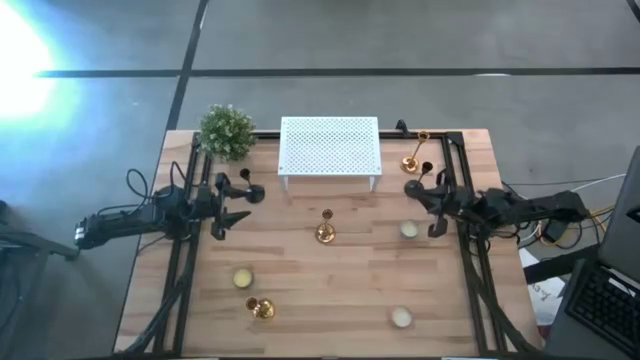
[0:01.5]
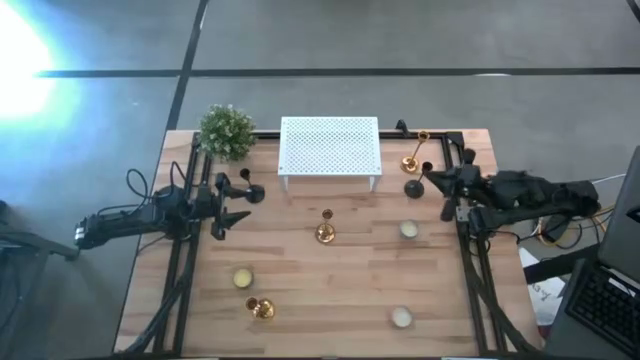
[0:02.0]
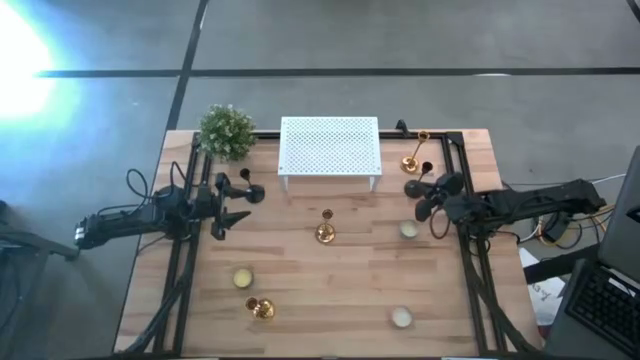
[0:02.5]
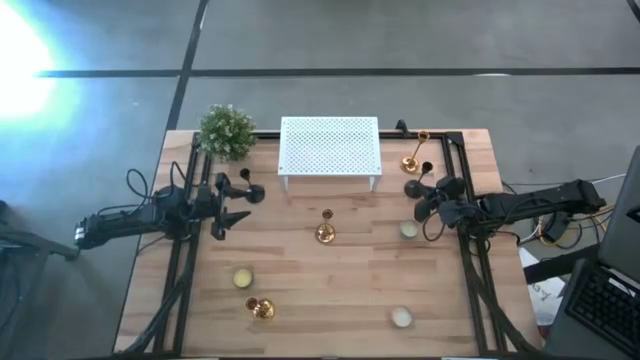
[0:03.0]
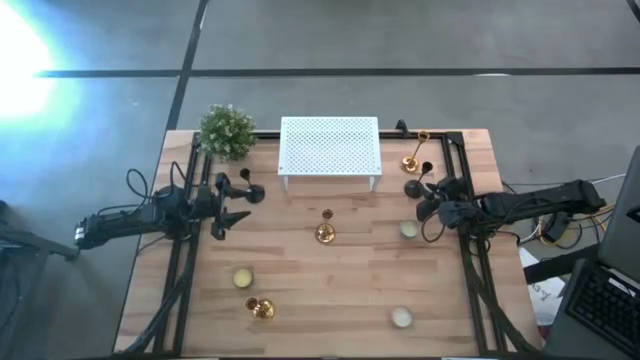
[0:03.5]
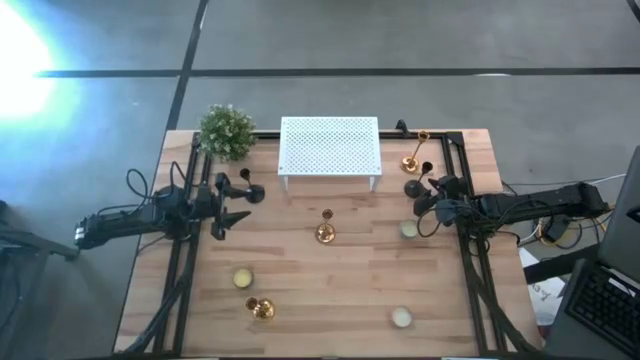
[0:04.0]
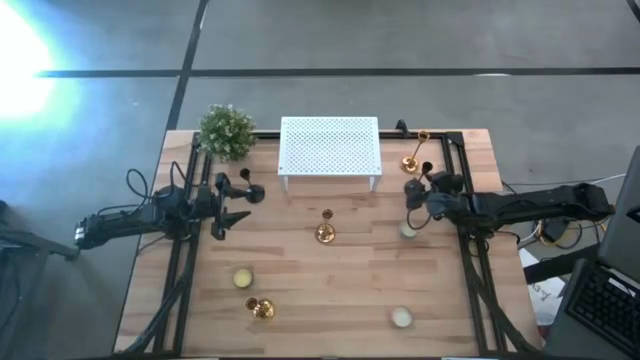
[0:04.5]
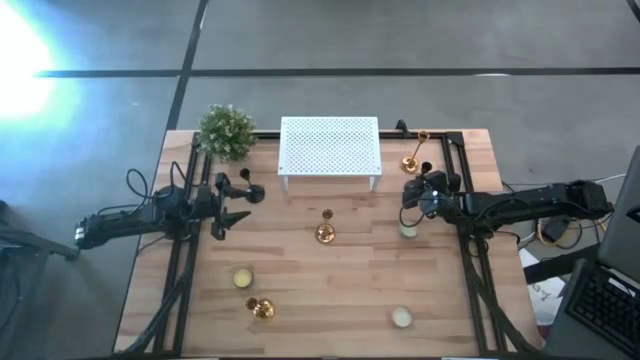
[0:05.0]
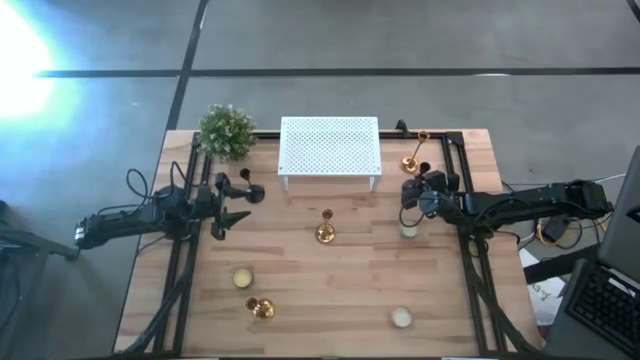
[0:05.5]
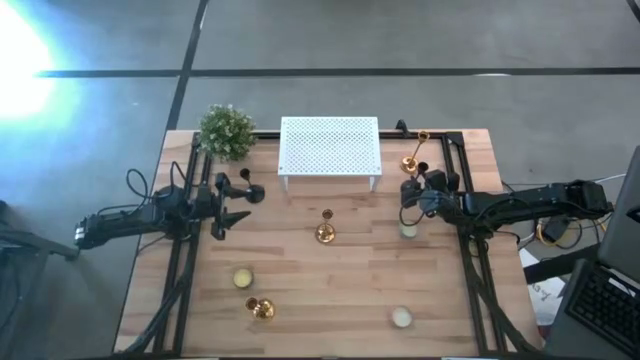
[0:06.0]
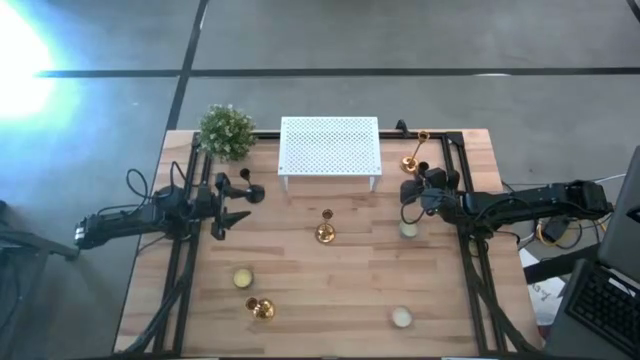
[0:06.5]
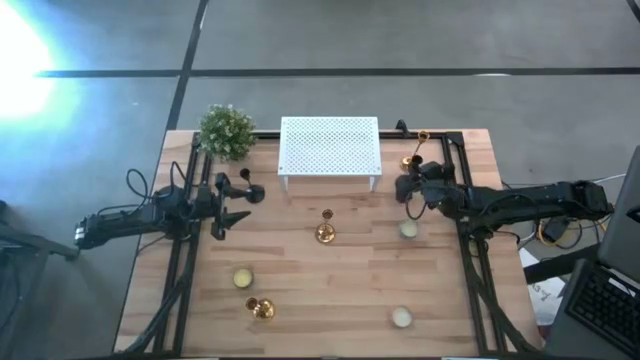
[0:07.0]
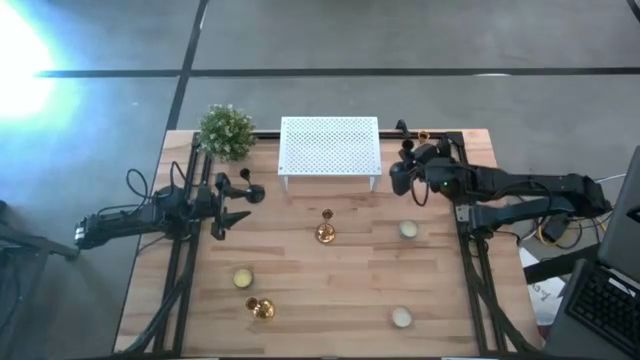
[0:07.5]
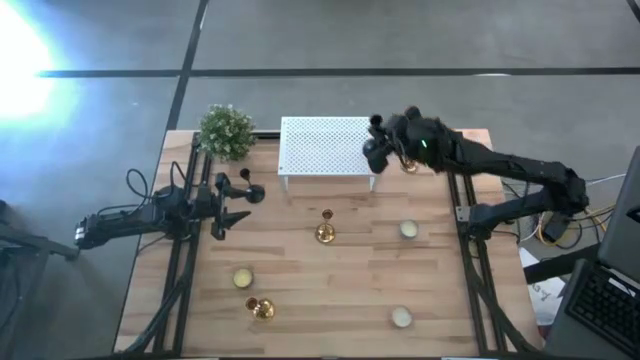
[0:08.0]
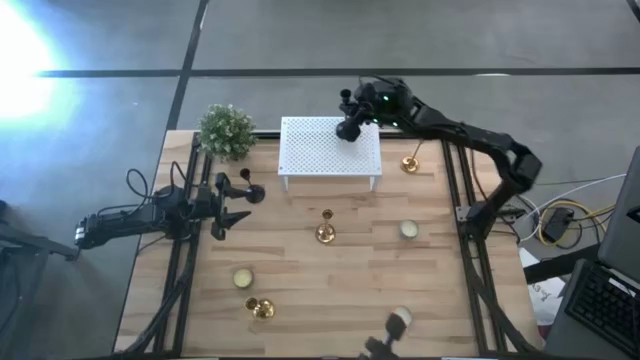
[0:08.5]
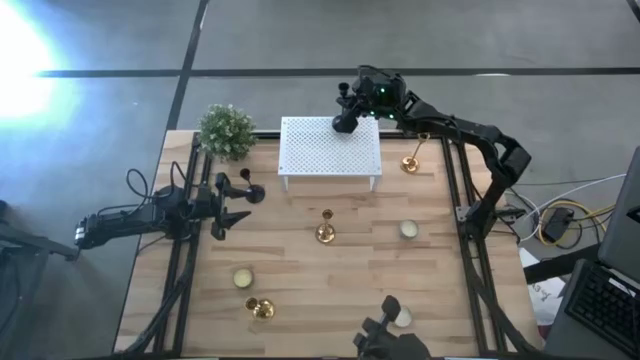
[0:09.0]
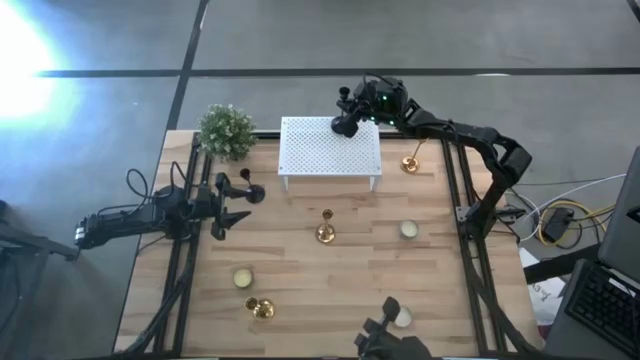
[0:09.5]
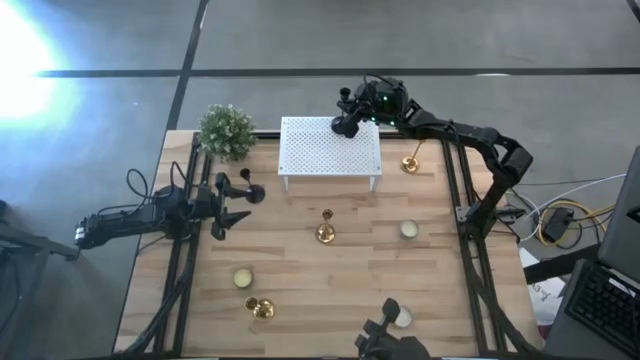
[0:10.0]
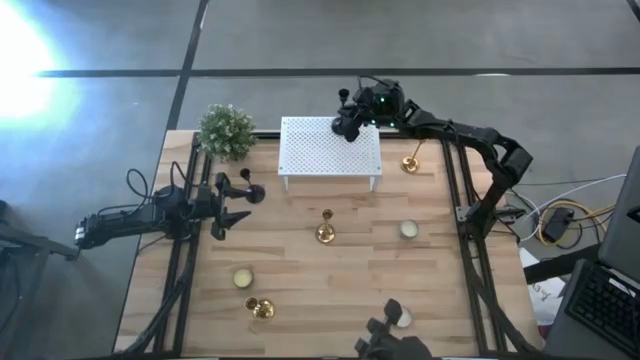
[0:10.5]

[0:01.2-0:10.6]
Task: Pick & Place candle stick holders
Put the right black candle holder on the shelf

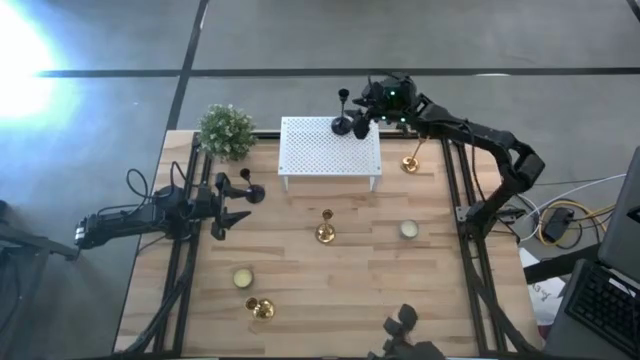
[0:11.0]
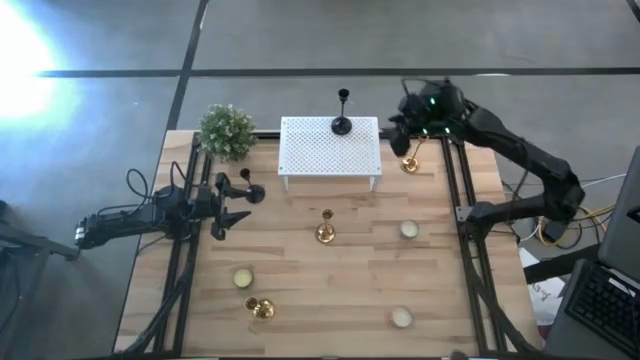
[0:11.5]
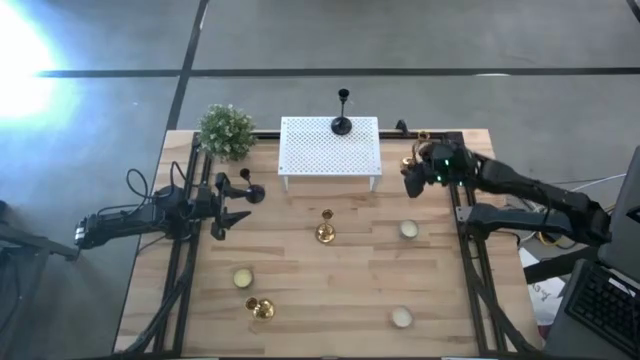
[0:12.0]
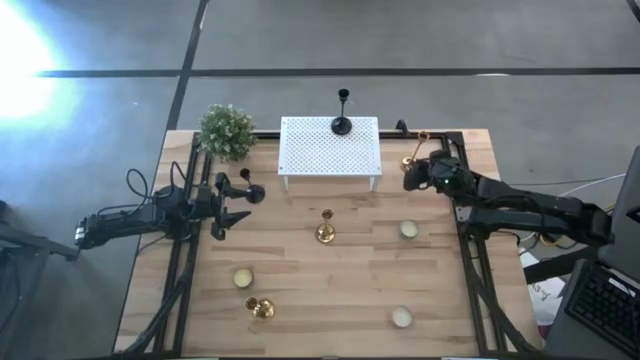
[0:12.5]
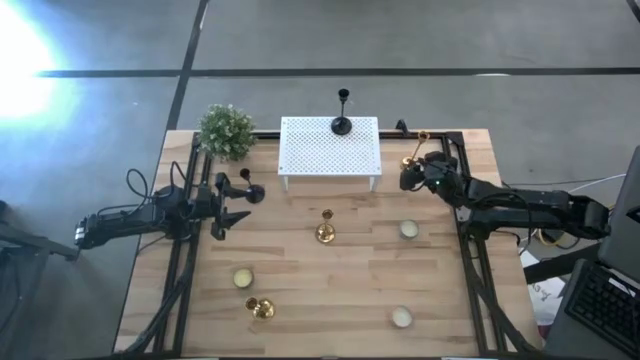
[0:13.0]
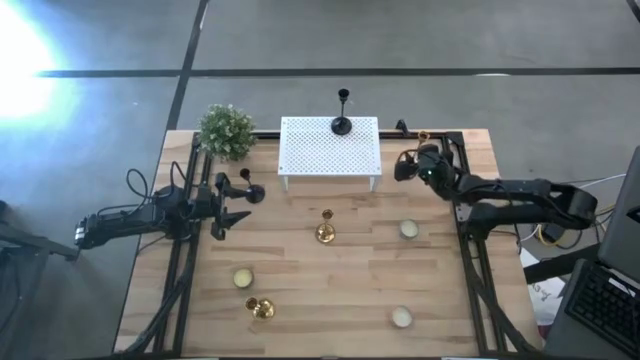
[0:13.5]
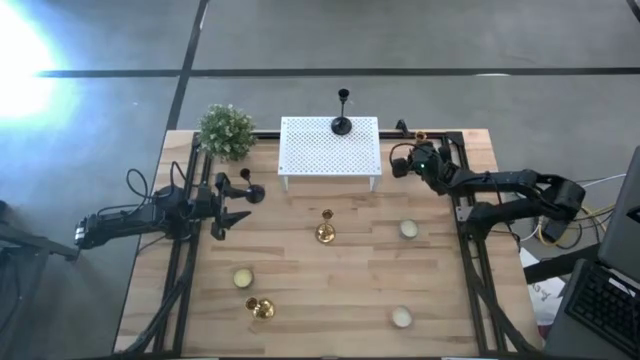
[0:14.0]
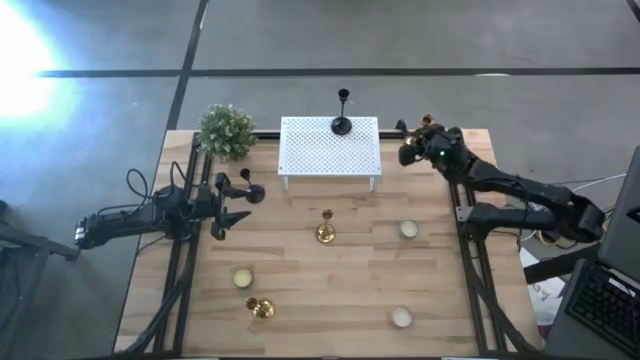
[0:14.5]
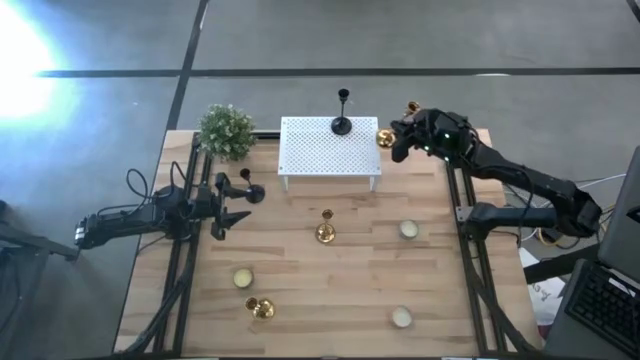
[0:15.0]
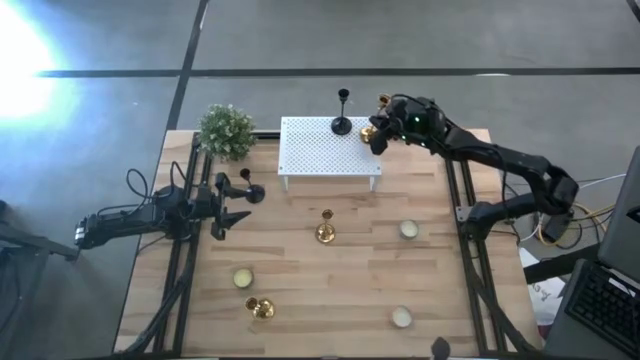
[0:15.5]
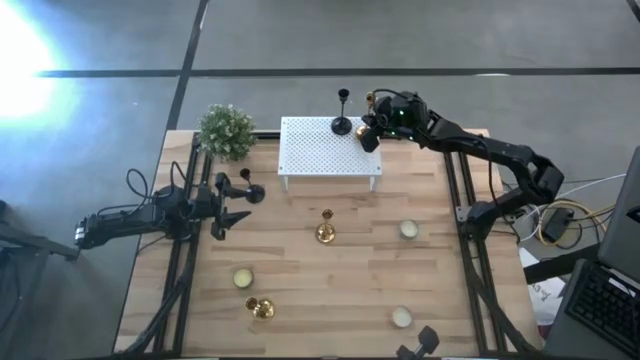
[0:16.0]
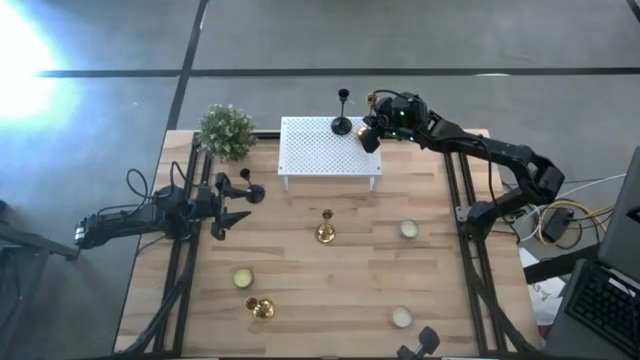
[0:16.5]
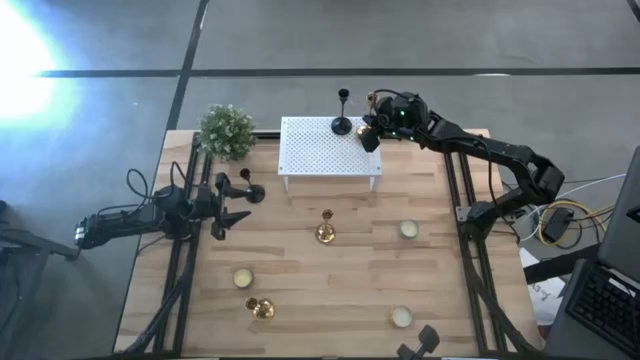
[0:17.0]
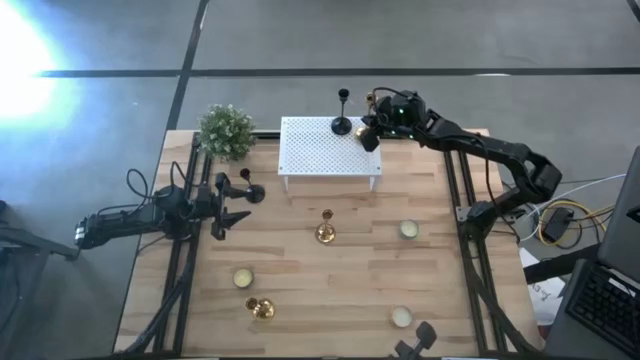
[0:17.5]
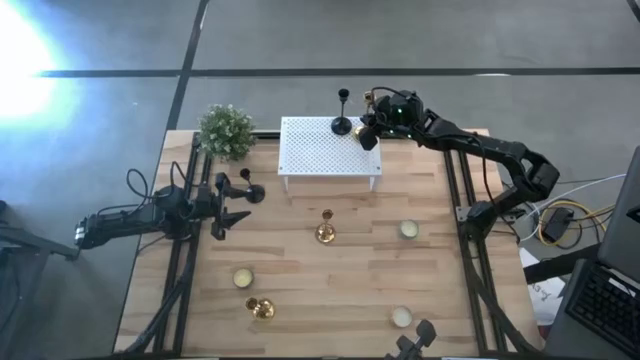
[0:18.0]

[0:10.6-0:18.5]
Put the top gold candle holder on the shelf

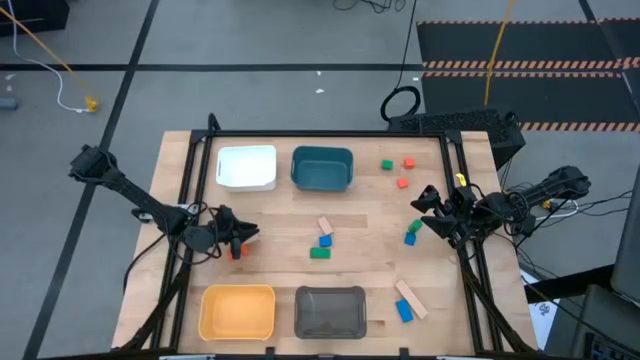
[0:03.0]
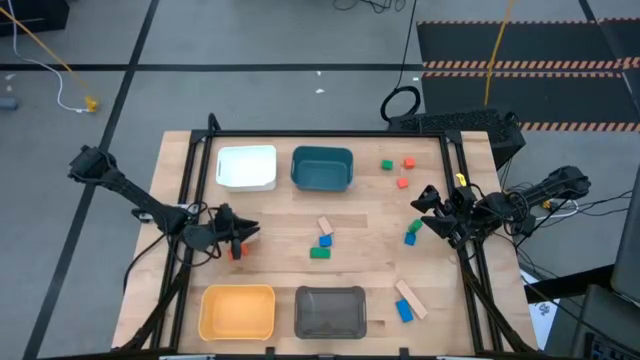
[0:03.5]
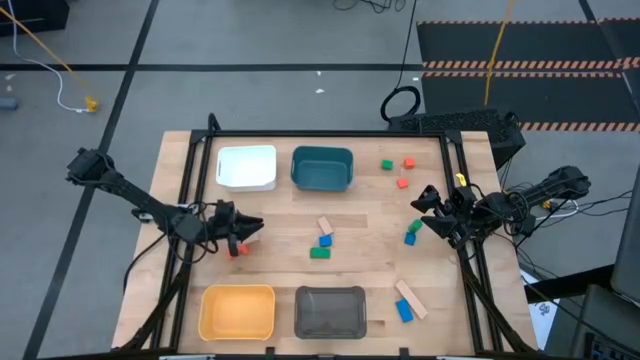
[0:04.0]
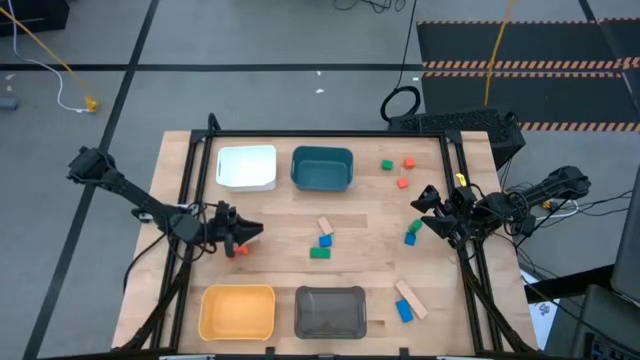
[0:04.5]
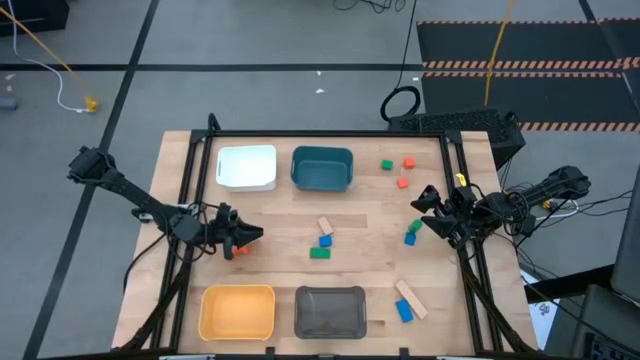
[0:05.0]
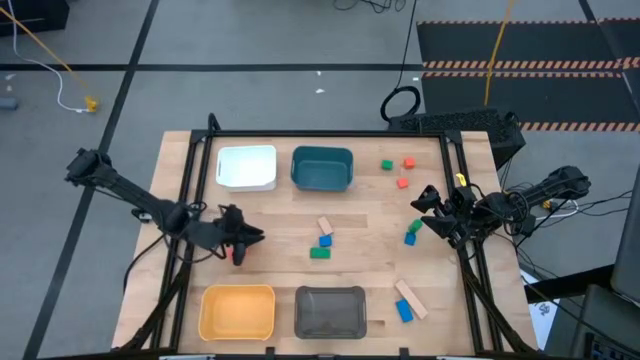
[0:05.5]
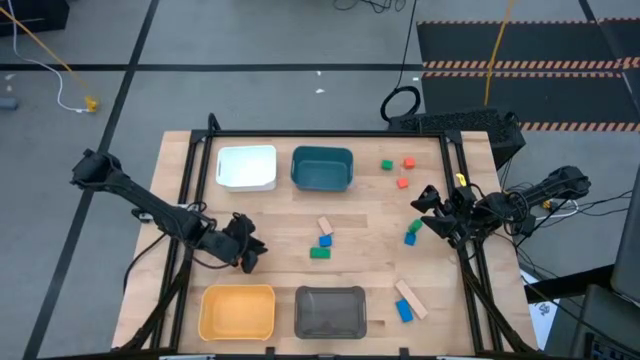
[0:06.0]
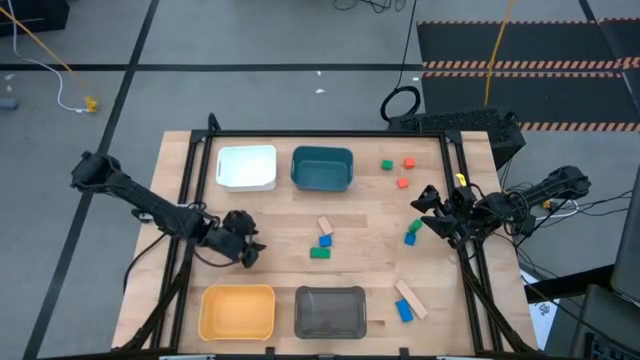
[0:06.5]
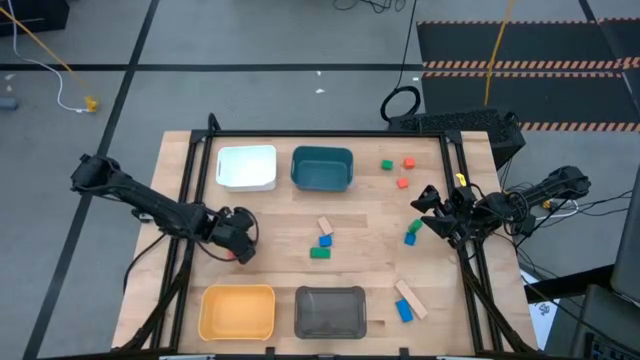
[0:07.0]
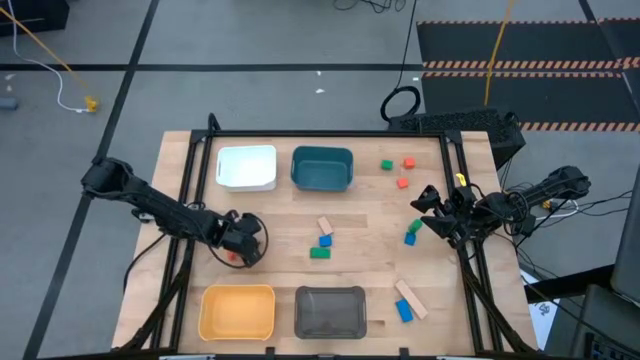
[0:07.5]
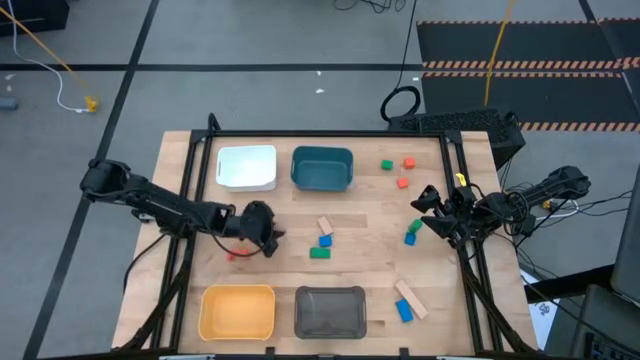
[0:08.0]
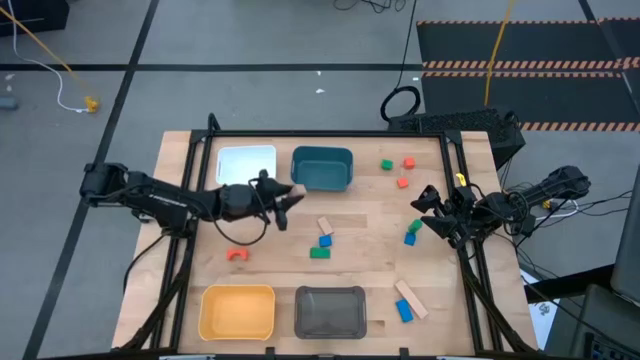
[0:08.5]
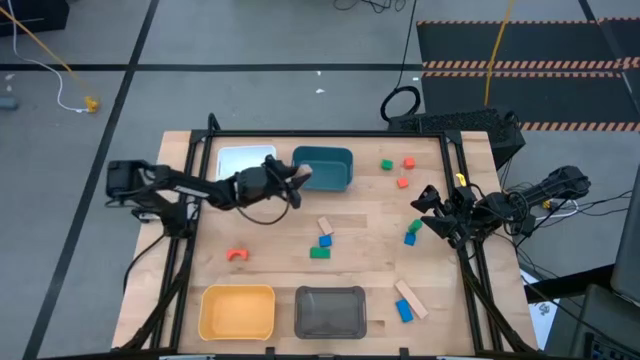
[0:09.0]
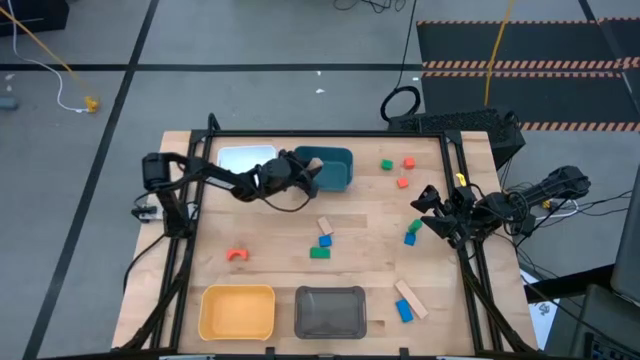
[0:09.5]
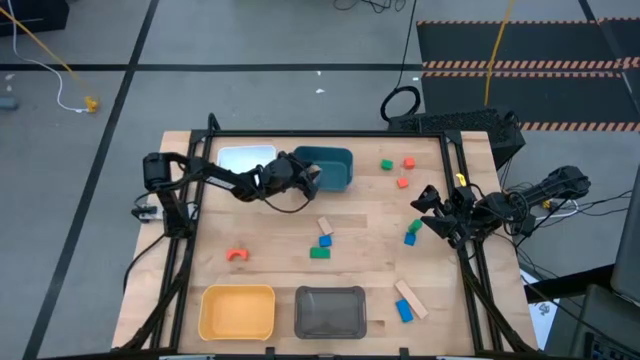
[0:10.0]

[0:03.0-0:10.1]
Task: Sort & place blocks by color
Put the top left brown block into the blue bin
